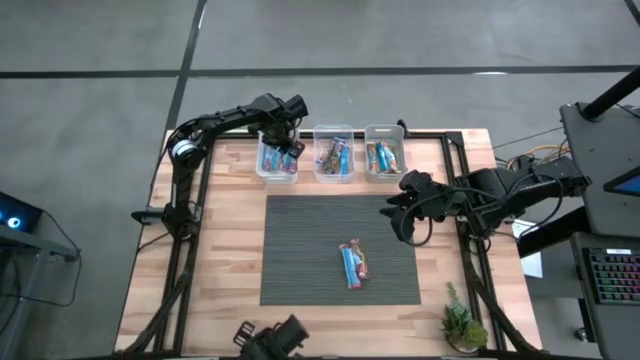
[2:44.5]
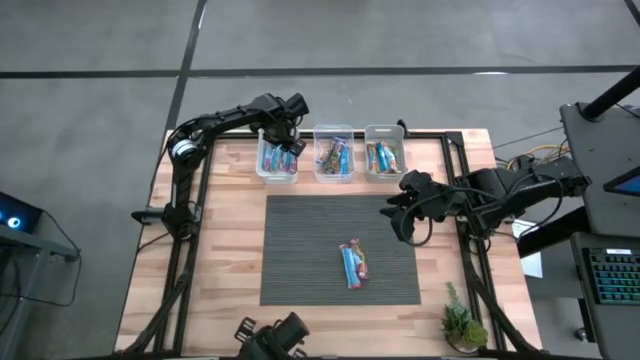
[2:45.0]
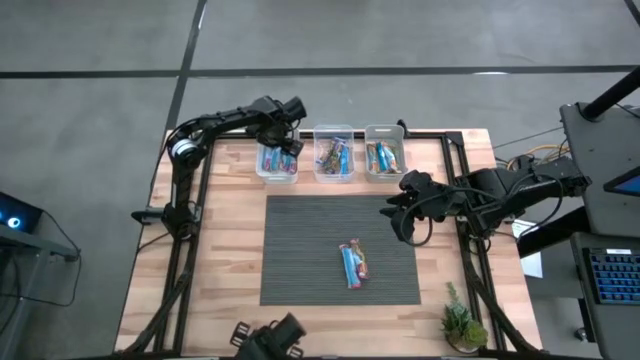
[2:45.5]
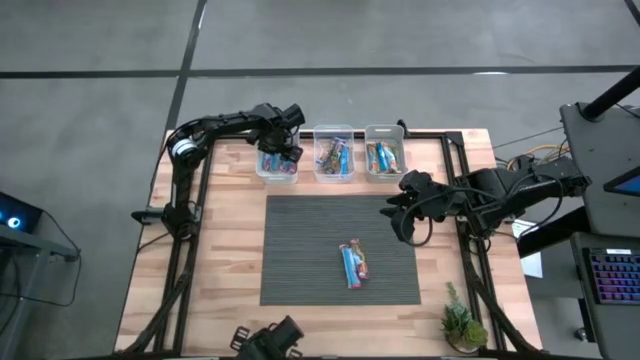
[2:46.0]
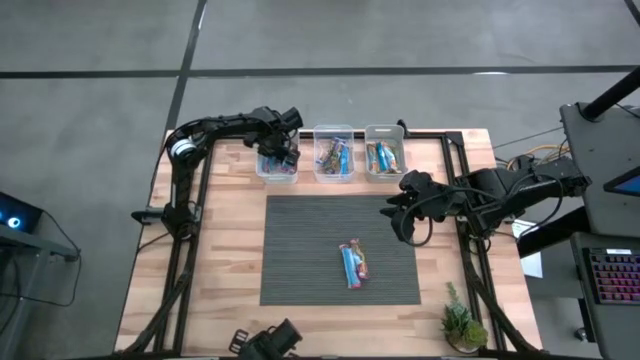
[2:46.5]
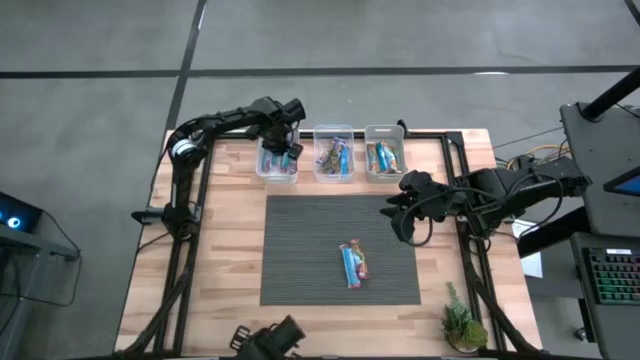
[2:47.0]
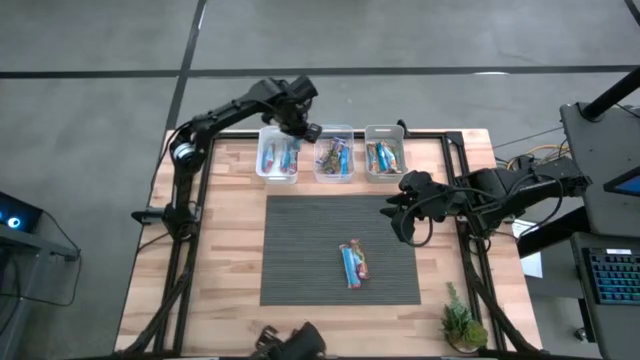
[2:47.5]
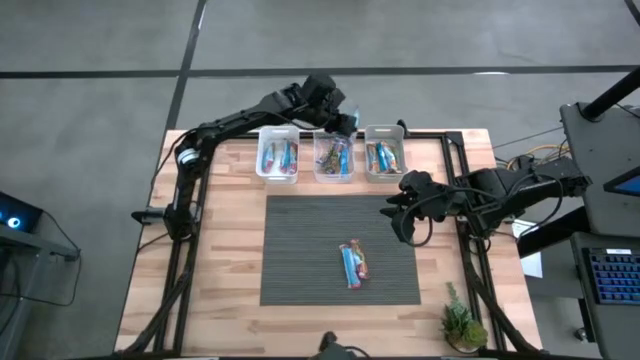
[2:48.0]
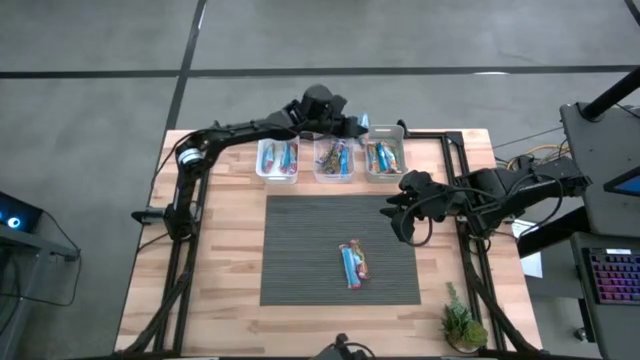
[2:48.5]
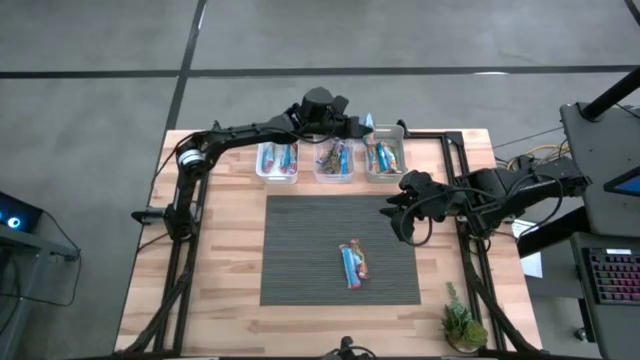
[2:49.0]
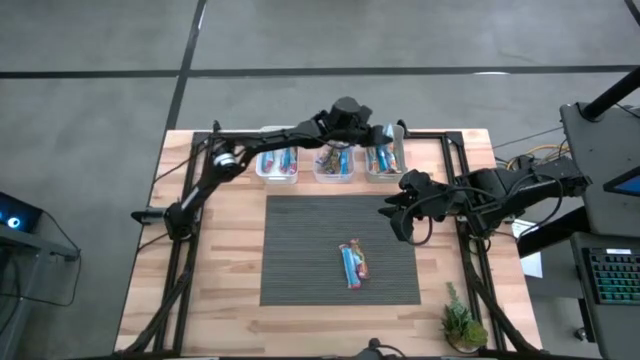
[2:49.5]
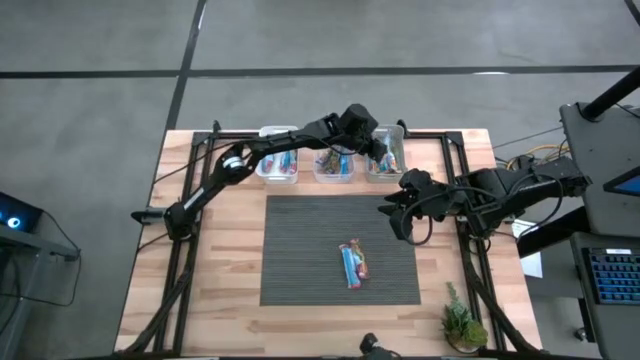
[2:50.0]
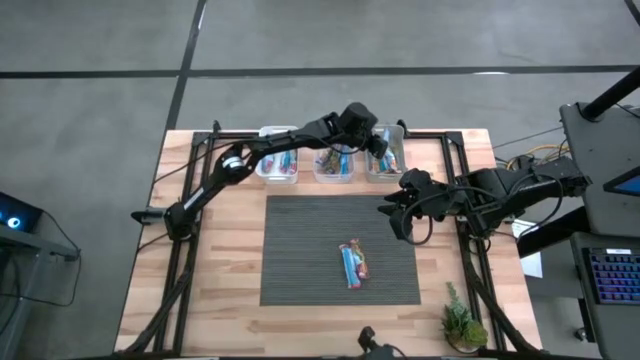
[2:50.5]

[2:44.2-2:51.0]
Task: Pick and place Granola Bars by type
Put the yellow granola bar into the white bin

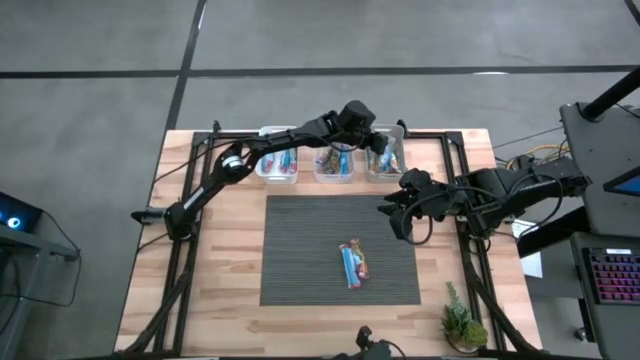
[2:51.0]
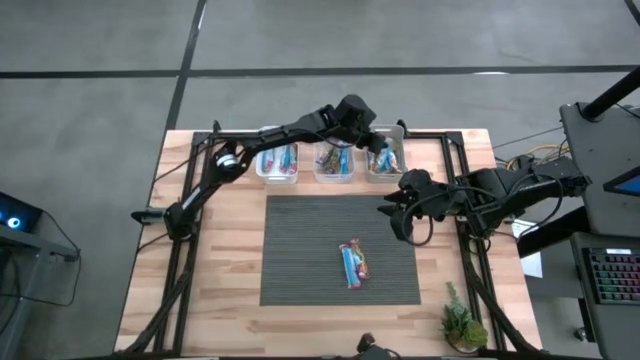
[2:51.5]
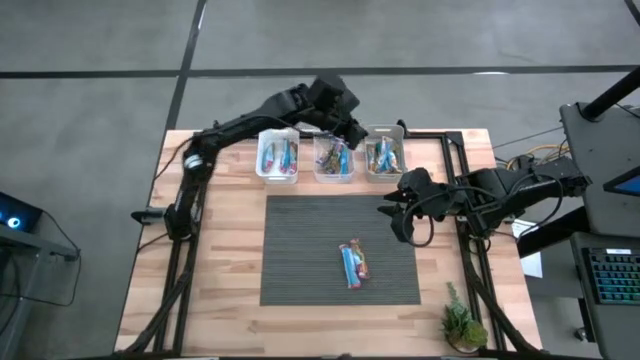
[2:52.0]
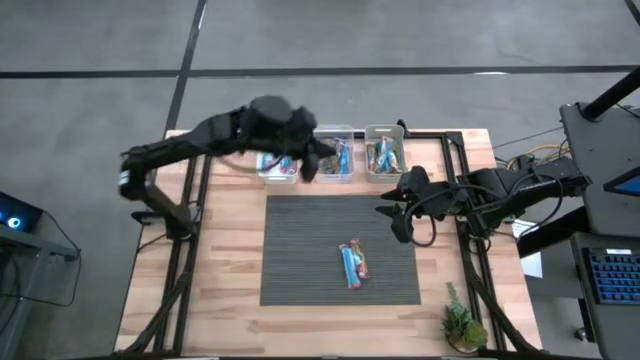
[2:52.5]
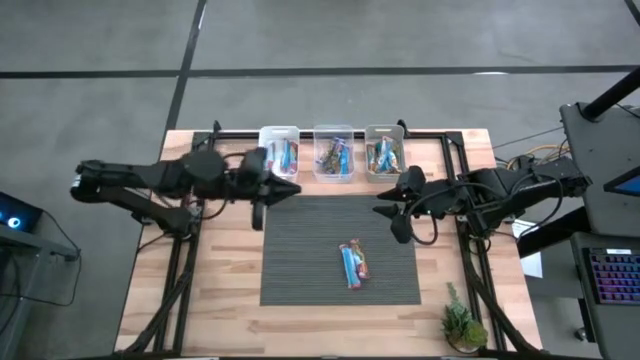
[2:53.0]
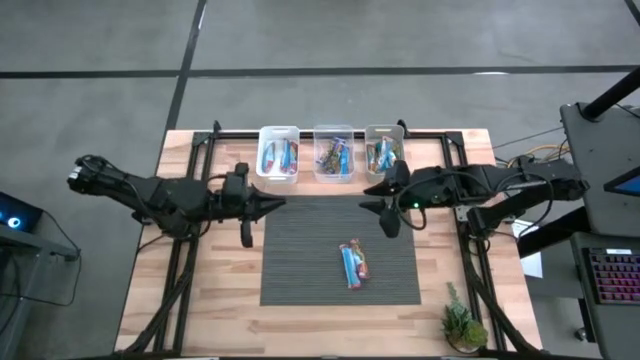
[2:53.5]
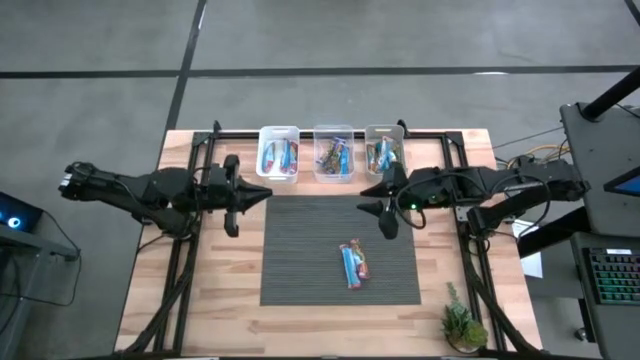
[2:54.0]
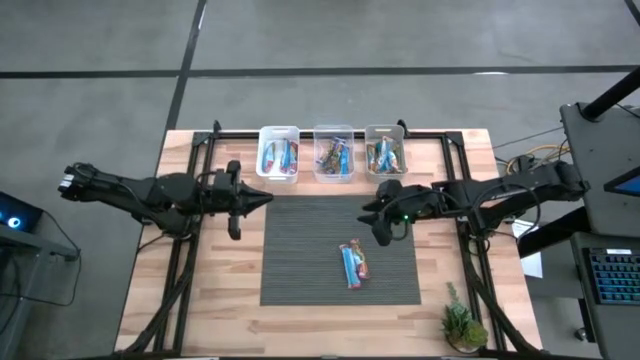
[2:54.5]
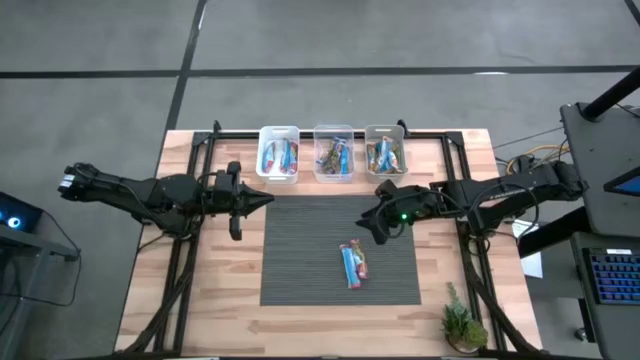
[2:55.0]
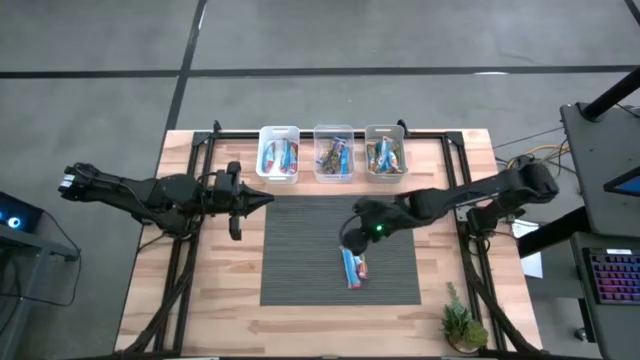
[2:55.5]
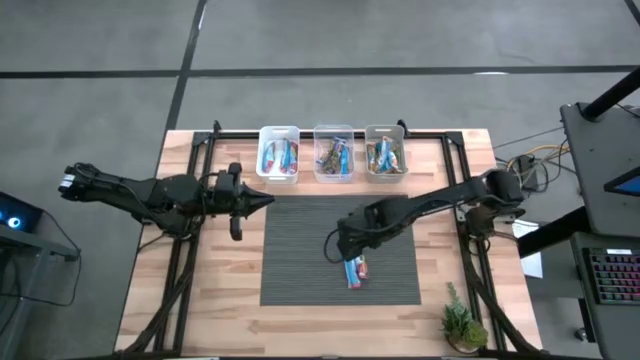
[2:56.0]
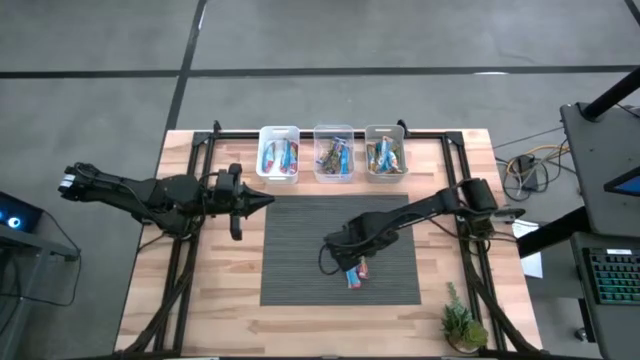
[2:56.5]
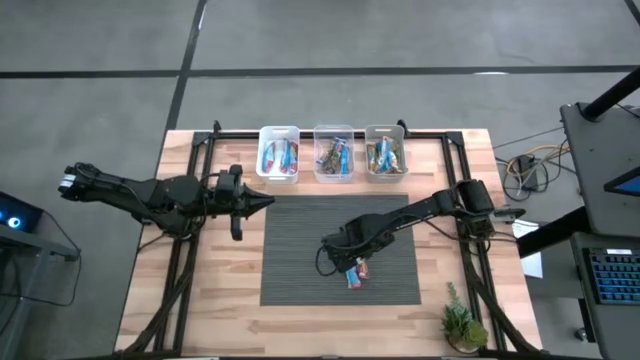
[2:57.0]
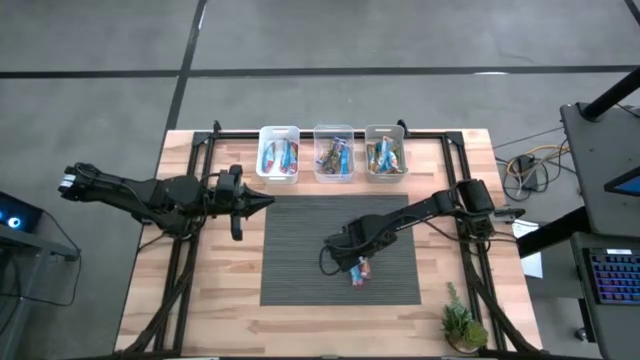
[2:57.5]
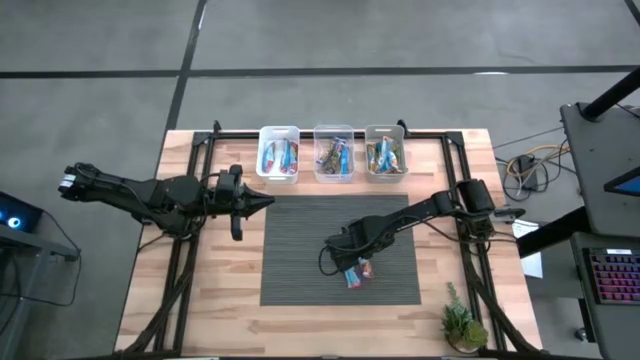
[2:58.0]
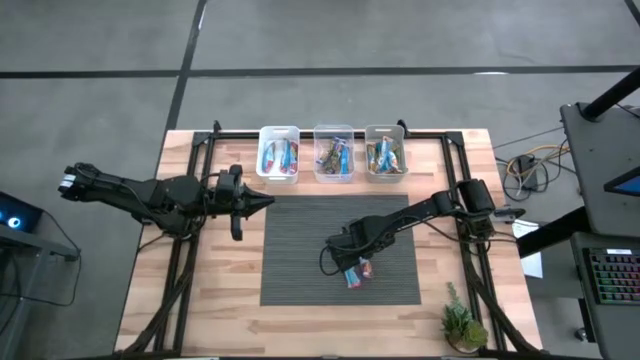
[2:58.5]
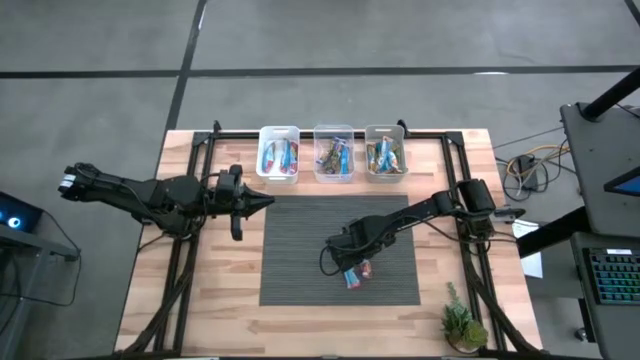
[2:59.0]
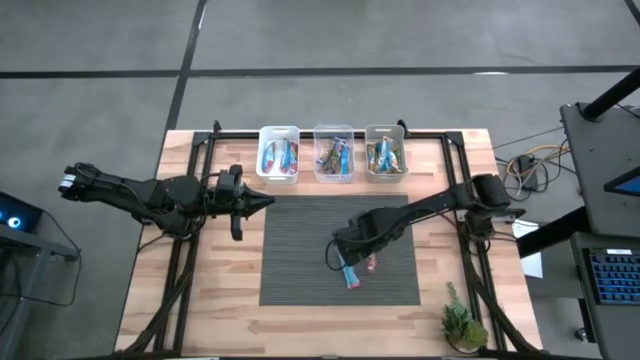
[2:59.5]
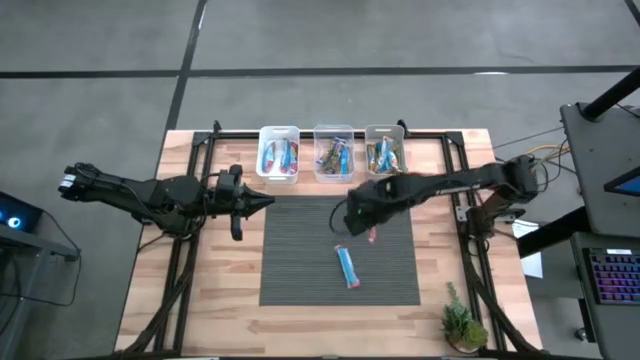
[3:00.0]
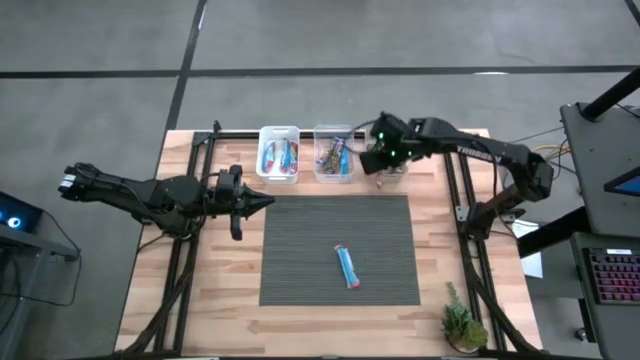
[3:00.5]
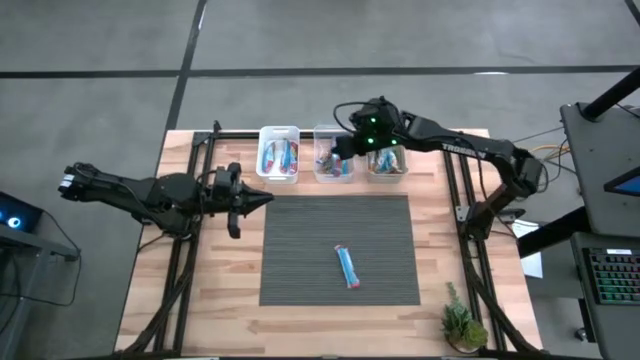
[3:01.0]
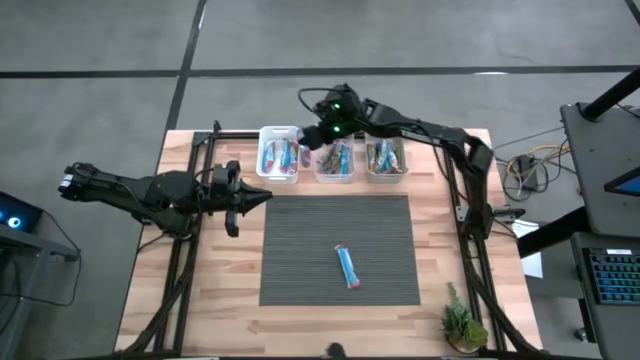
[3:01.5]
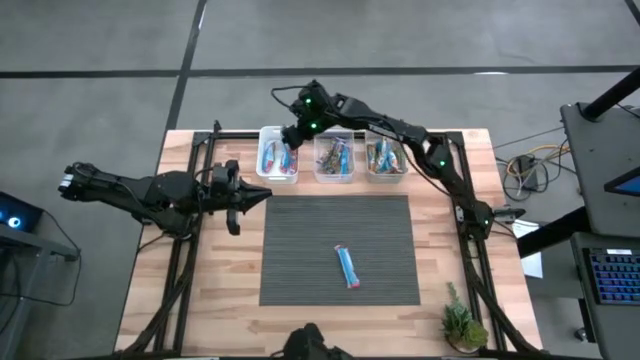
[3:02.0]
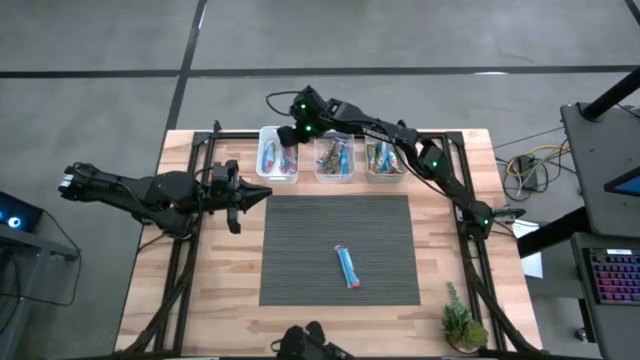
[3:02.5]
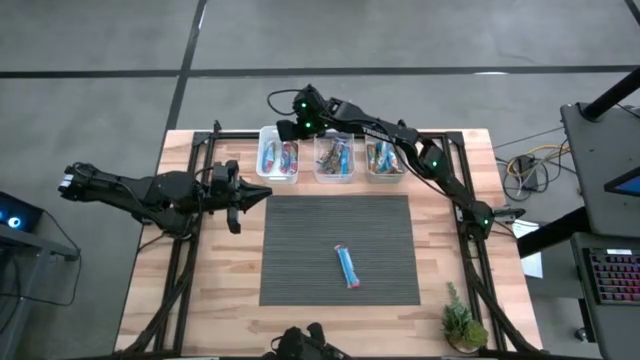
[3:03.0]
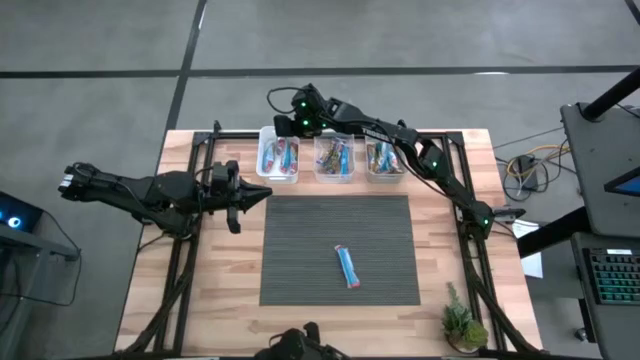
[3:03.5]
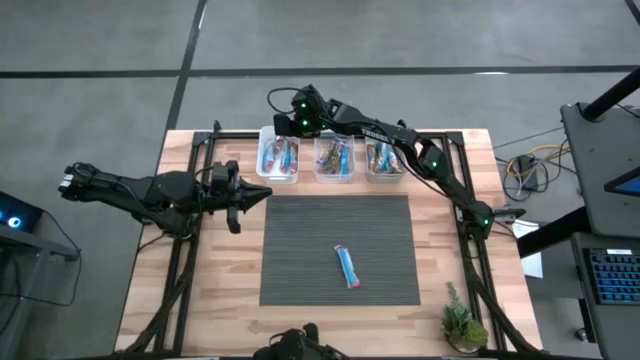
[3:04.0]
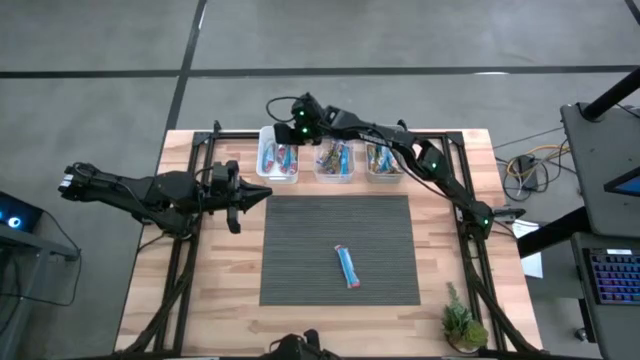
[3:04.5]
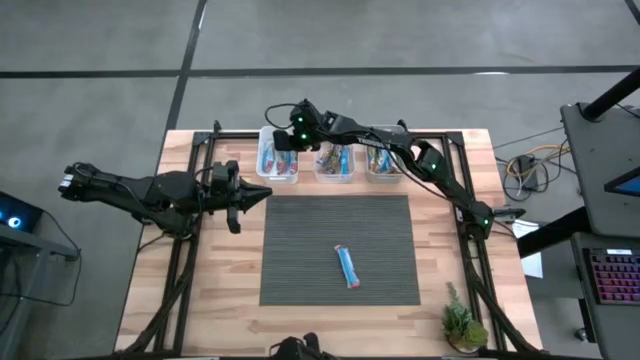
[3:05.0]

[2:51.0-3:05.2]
Put the red granola bar into the white bin

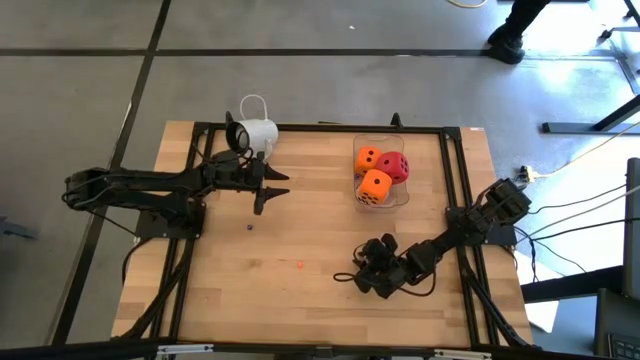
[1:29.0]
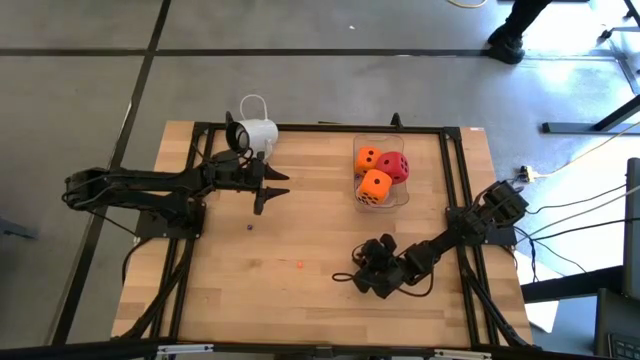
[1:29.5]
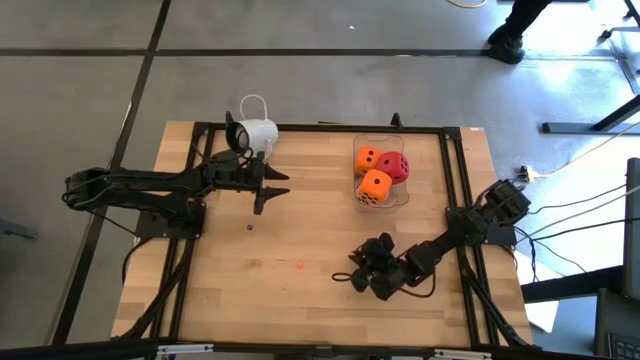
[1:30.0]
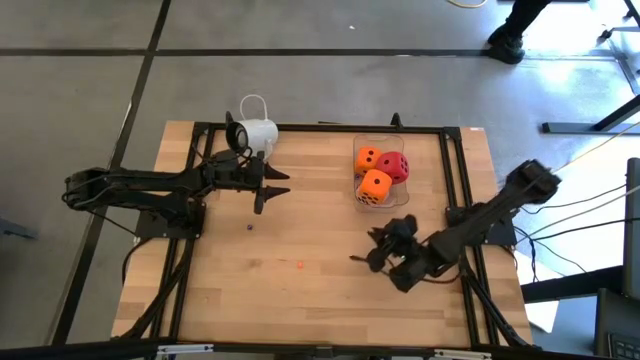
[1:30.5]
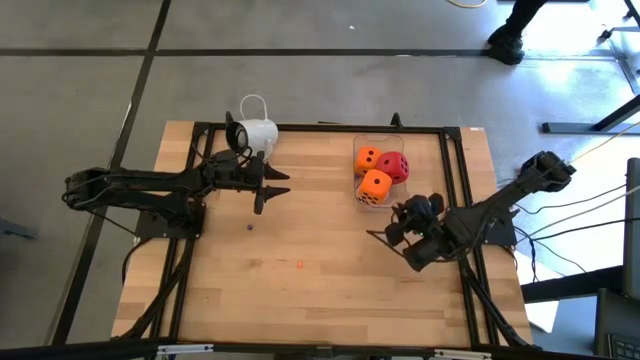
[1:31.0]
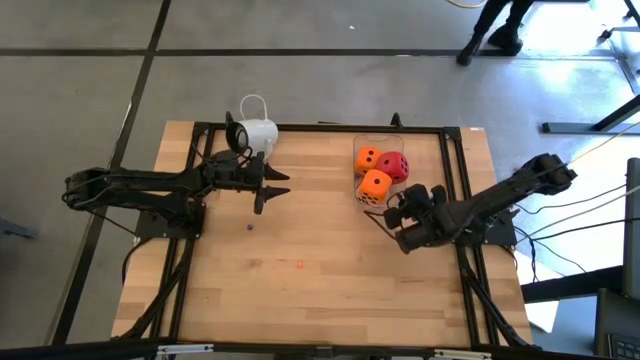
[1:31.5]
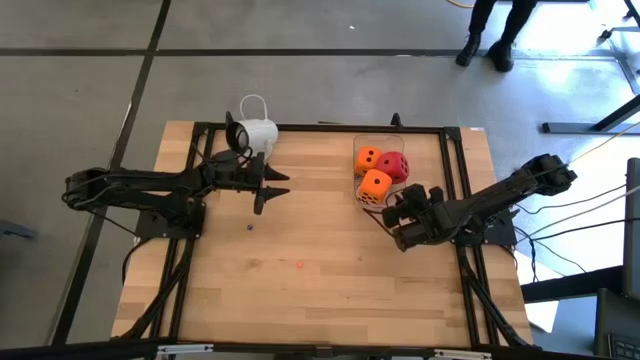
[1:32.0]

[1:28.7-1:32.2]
Task: Pick & Place Dice
Put the small yellow die into the transparent bin
